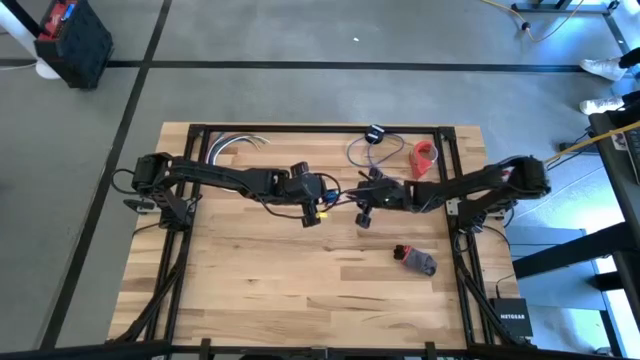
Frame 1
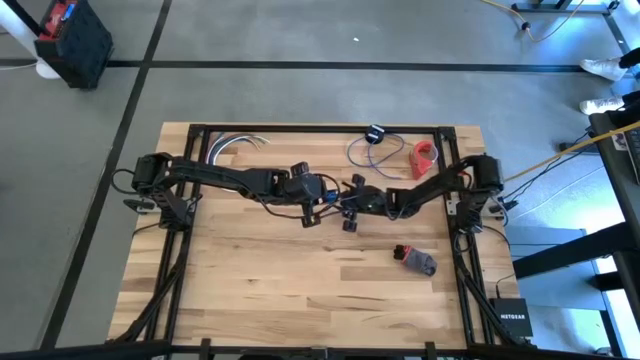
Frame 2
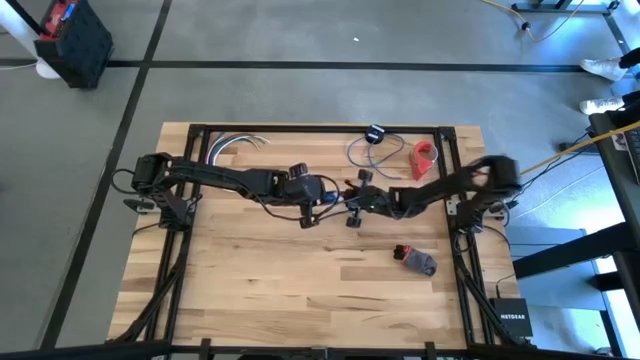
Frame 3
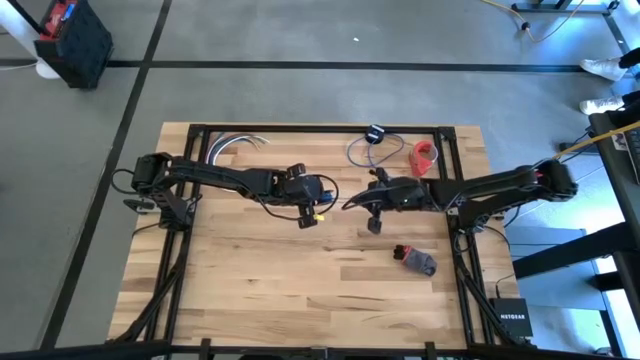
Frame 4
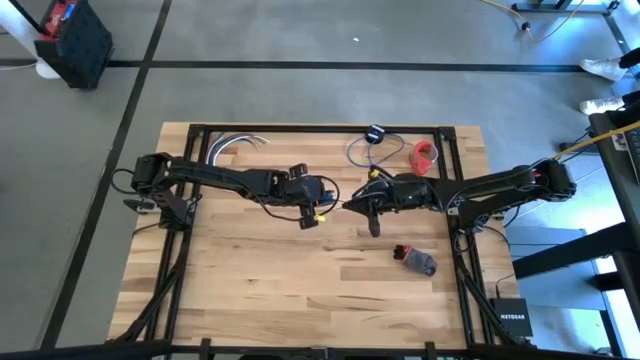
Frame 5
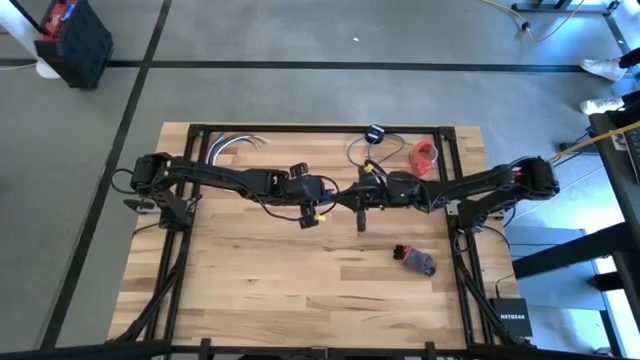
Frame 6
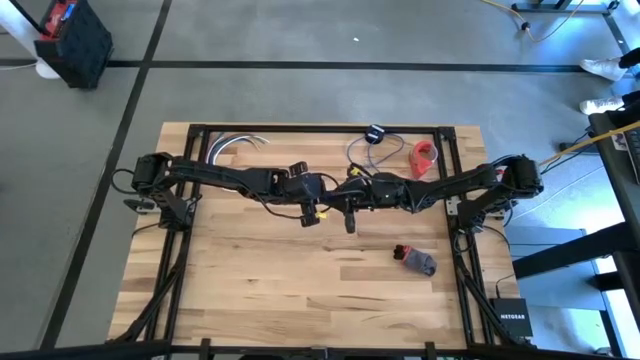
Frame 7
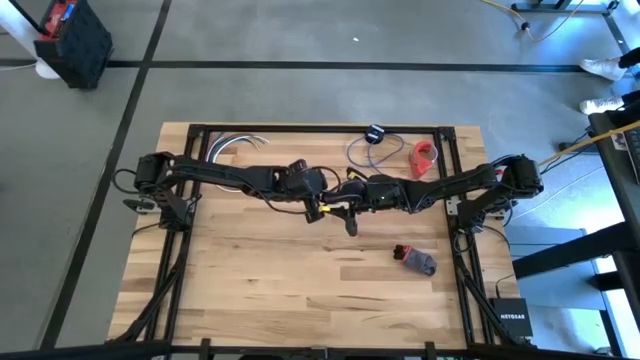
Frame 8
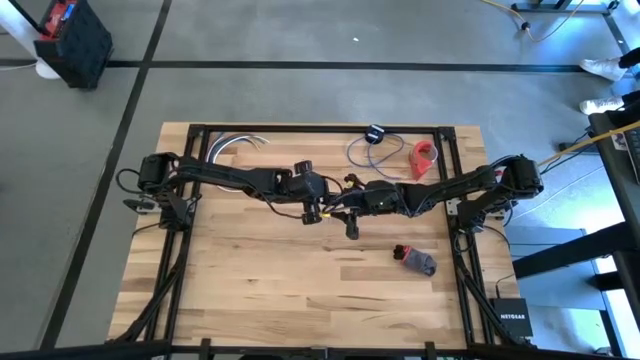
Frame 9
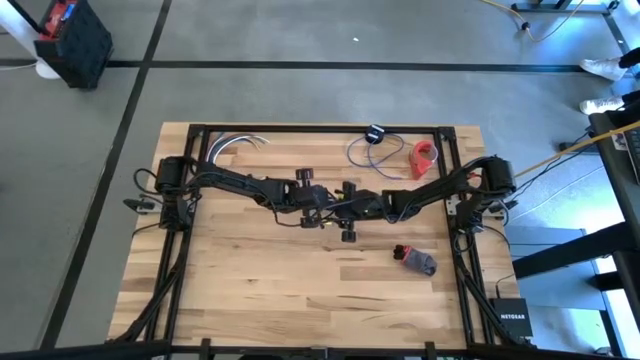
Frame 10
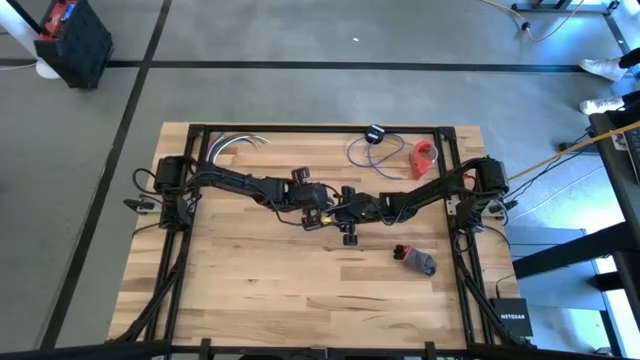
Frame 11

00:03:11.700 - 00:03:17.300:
Task: Coil cords
Coil the blue wire onto the spool

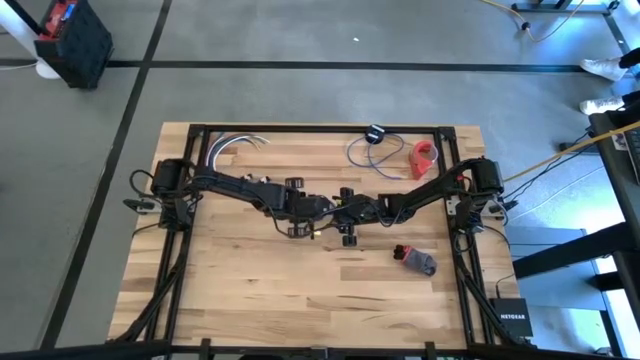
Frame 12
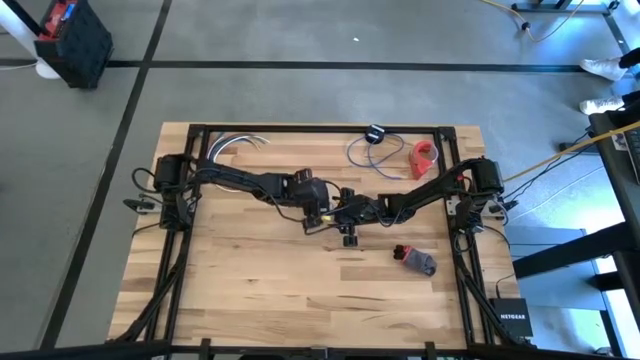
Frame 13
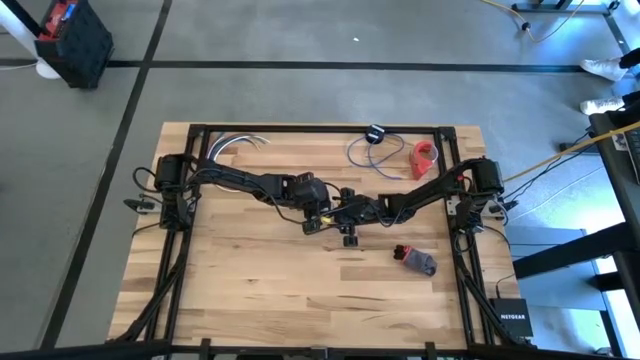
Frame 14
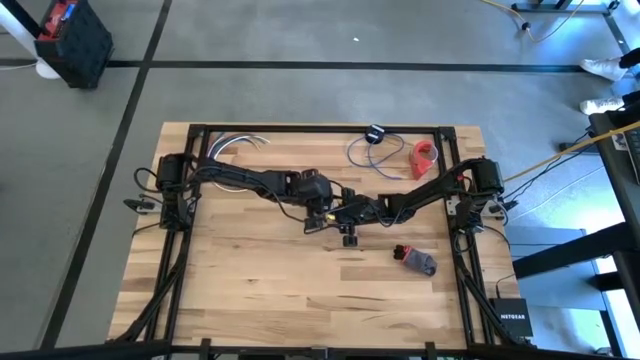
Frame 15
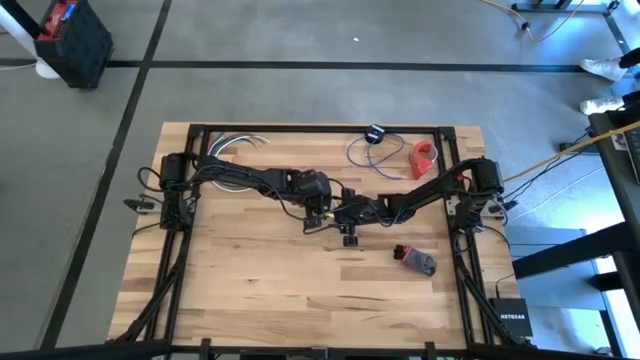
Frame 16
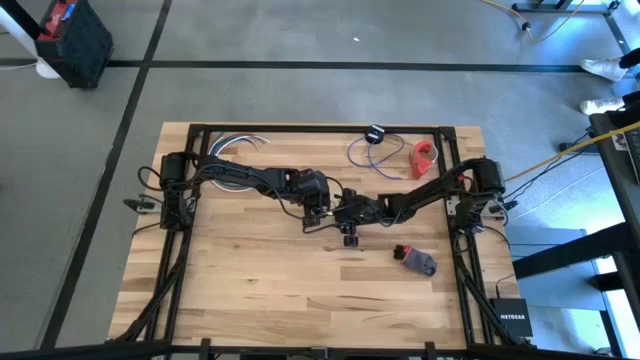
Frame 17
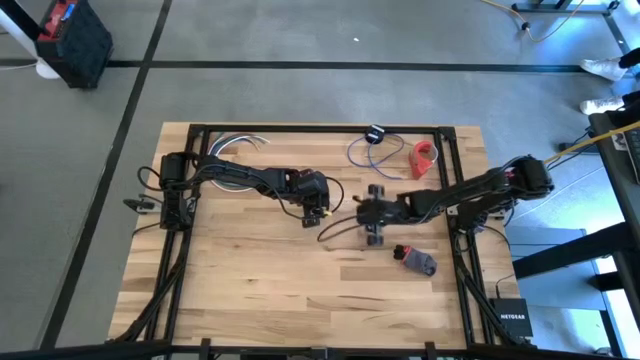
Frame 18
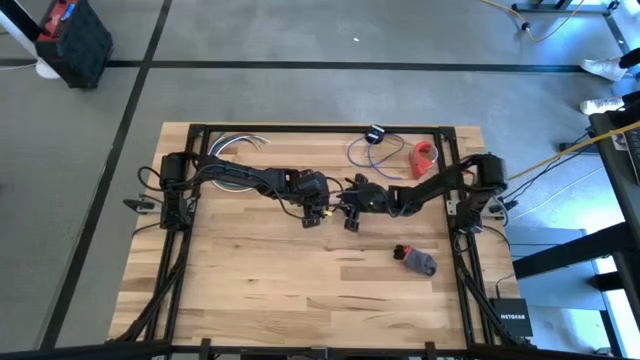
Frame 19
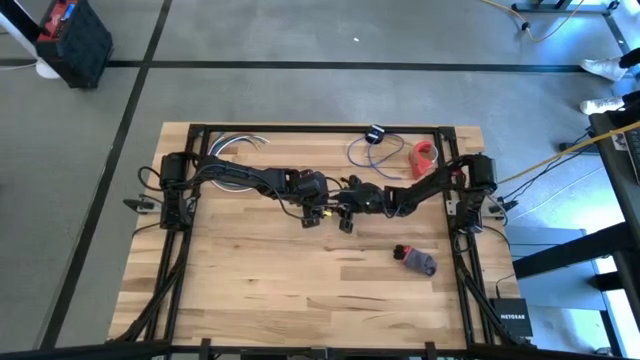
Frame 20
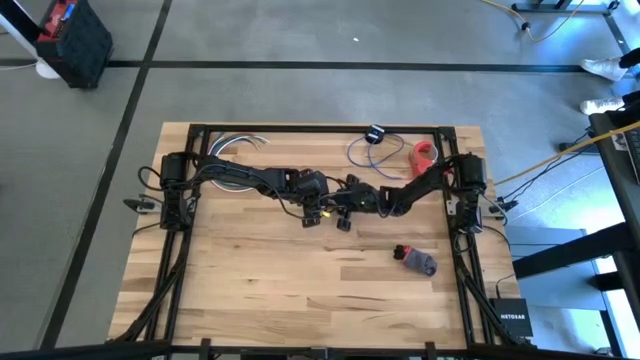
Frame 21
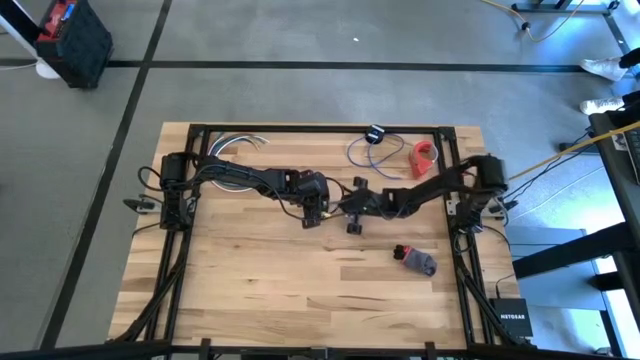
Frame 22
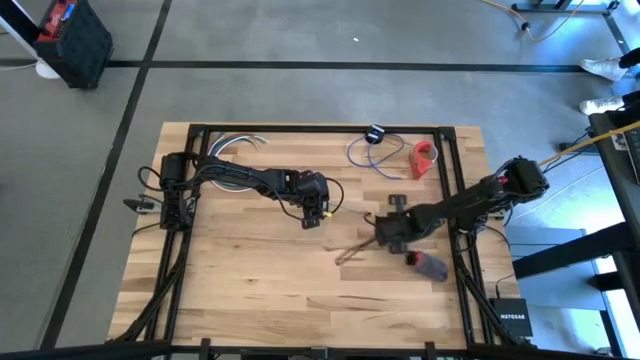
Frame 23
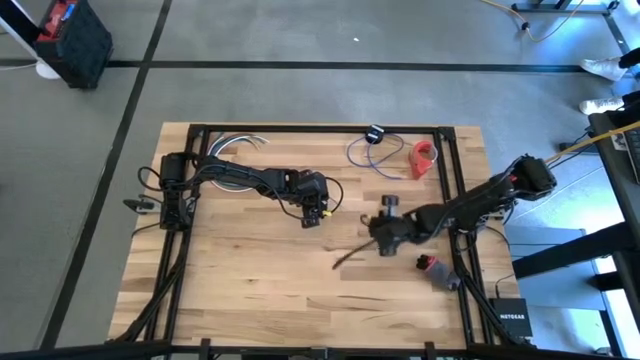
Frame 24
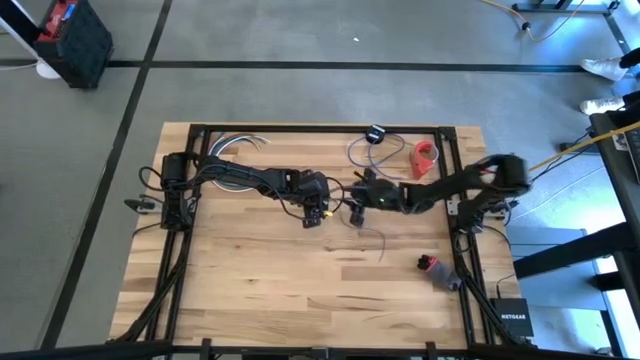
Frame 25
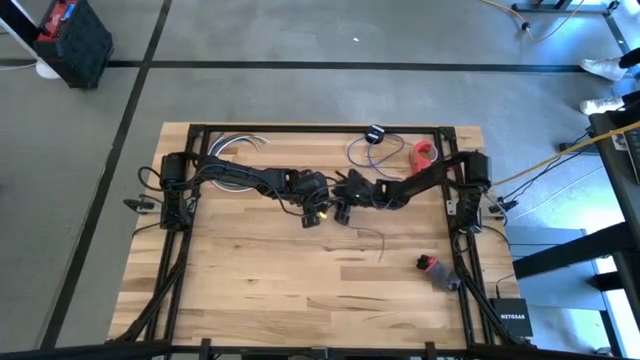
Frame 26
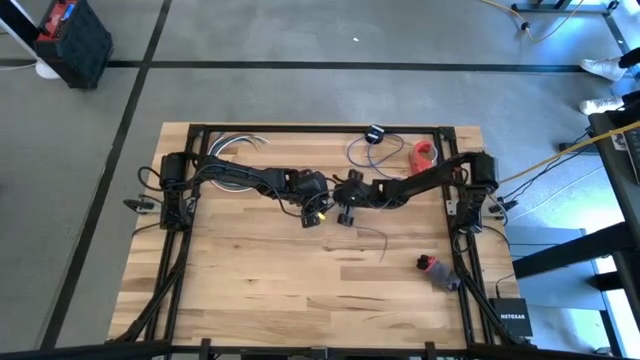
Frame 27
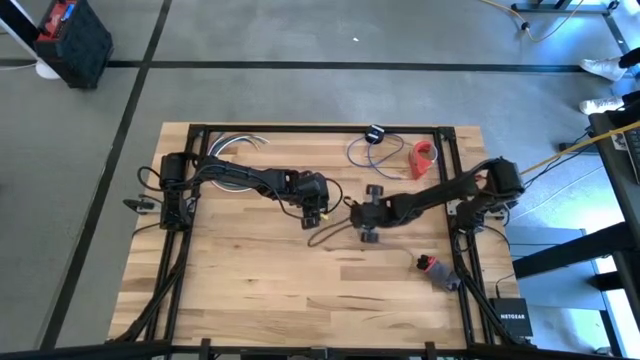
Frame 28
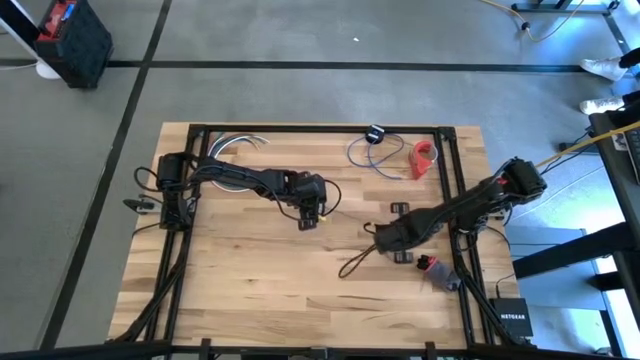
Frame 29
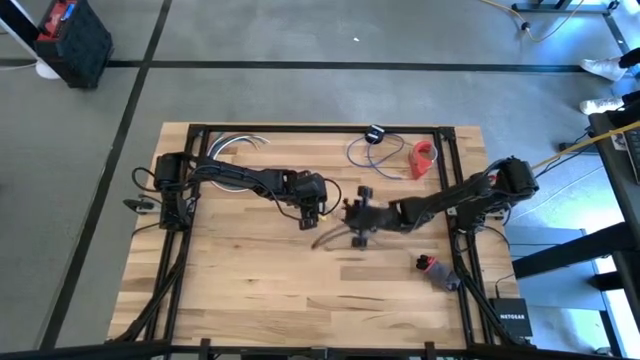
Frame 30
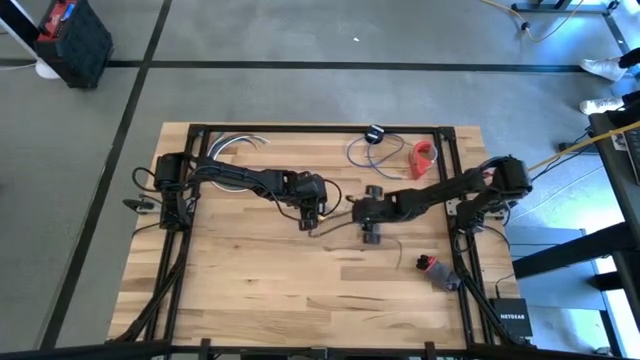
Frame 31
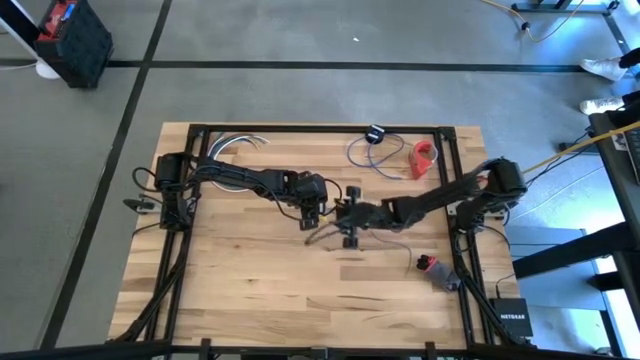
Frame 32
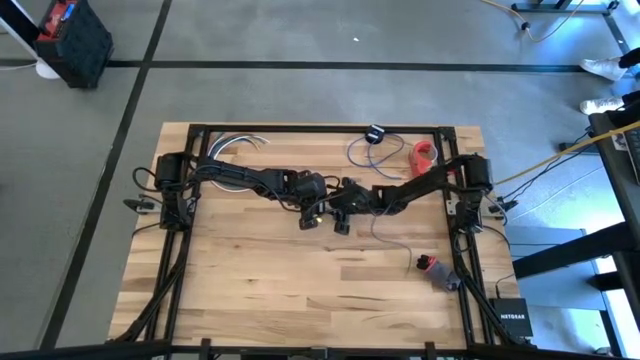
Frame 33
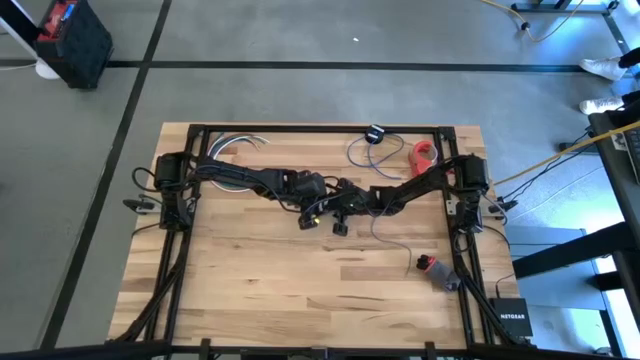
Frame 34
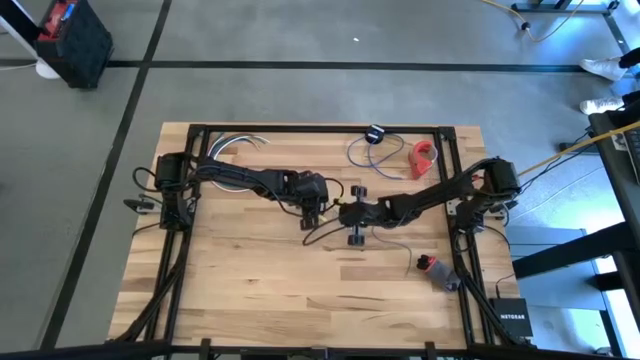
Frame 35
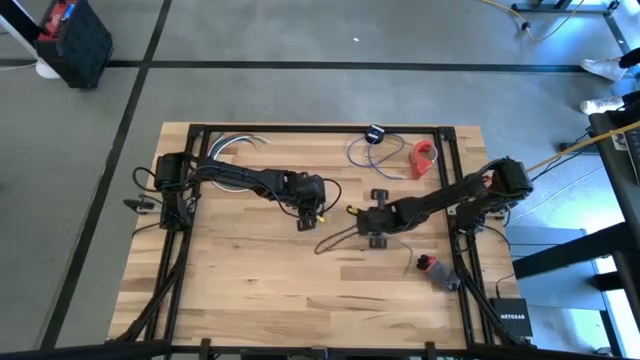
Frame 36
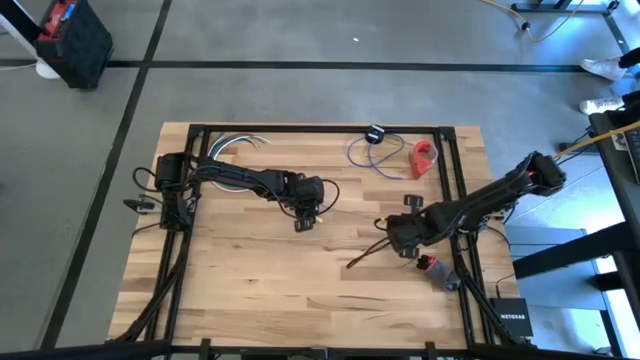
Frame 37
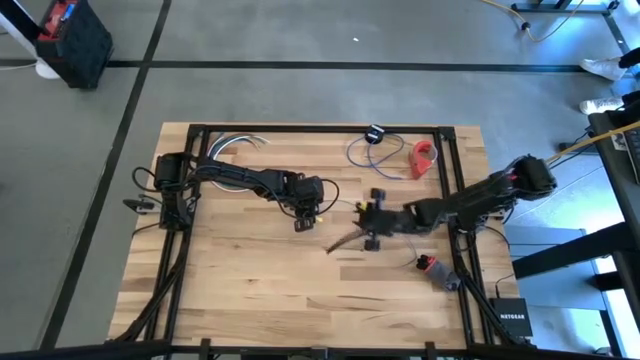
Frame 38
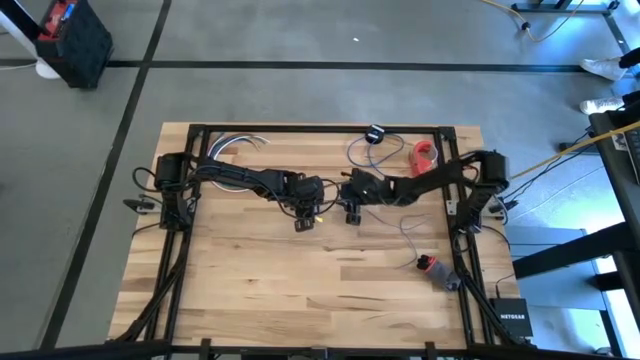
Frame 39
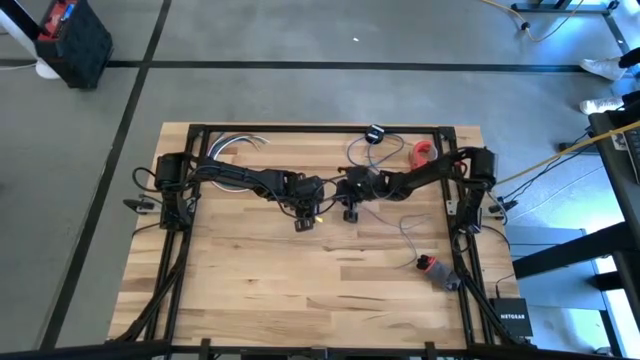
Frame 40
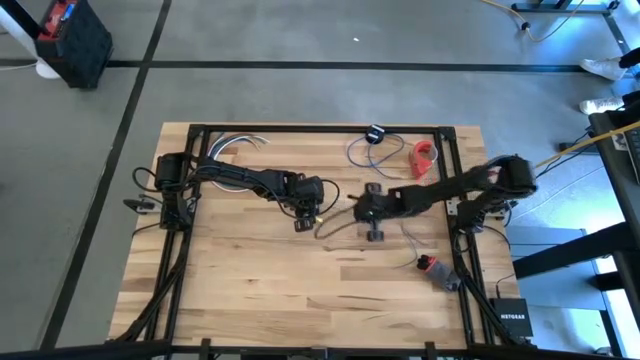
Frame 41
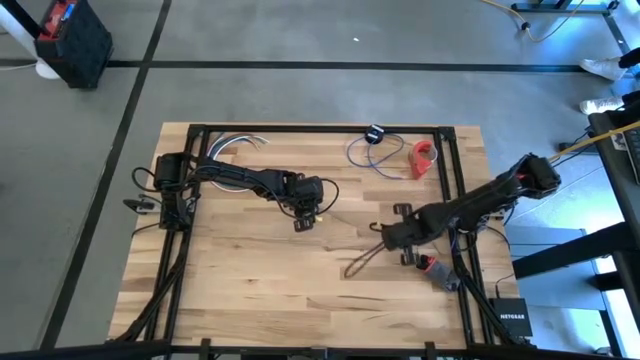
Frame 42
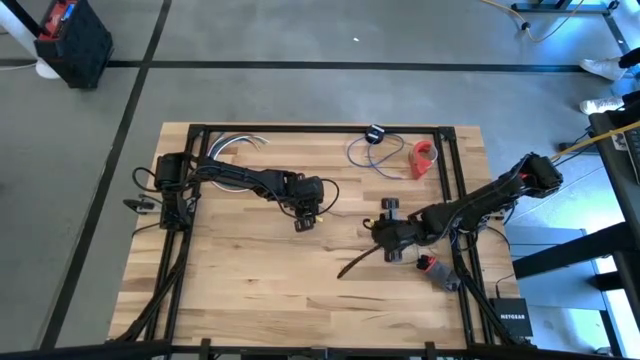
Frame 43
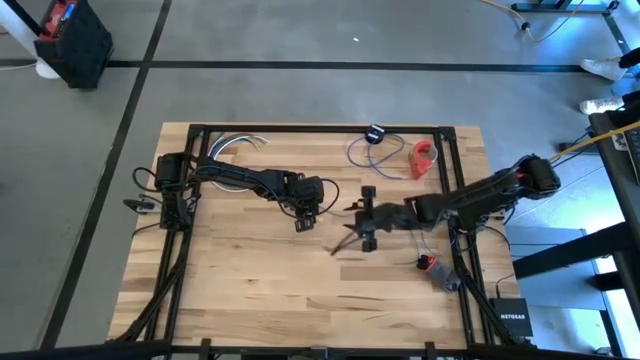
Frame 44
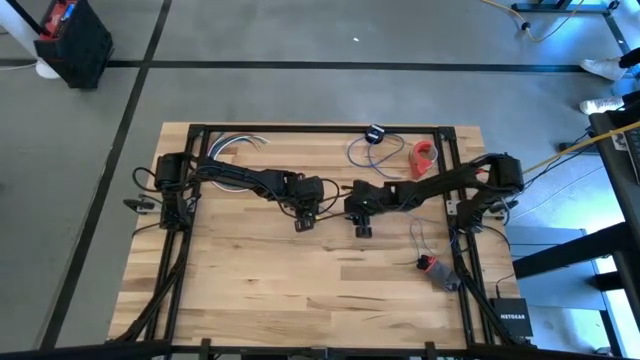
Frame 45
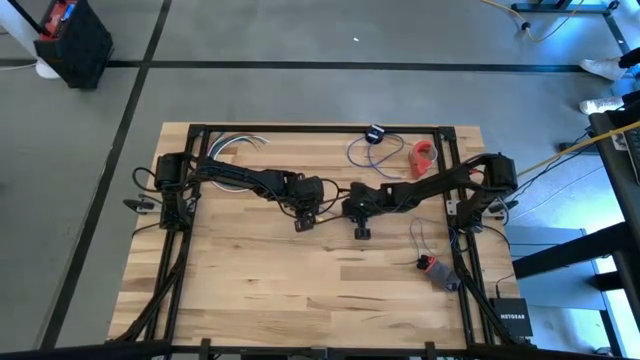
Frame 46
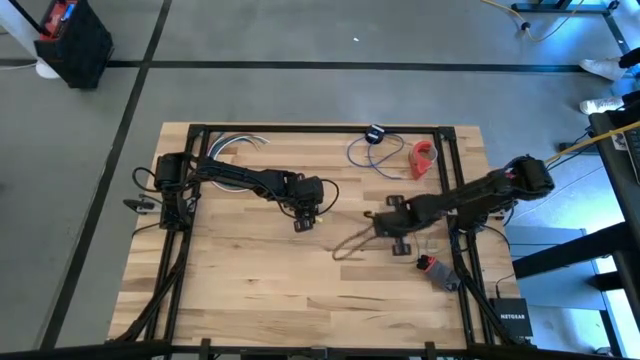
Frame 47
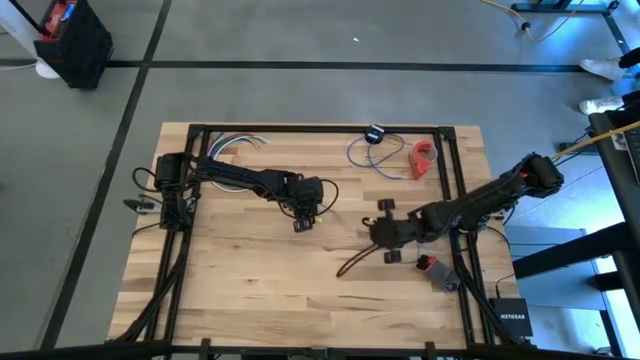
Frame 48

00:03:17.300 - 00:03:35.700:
Uncoil the blue wire from the spool
